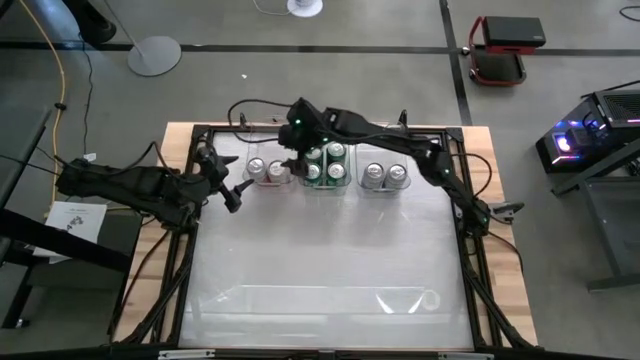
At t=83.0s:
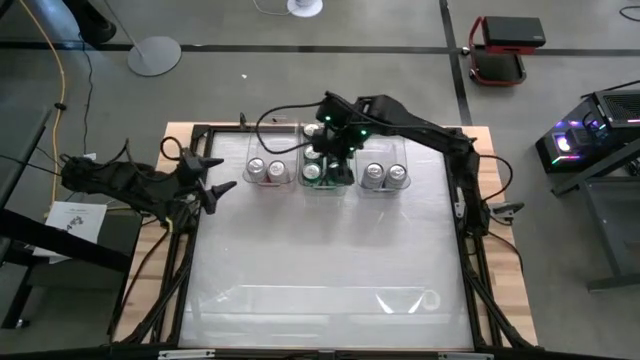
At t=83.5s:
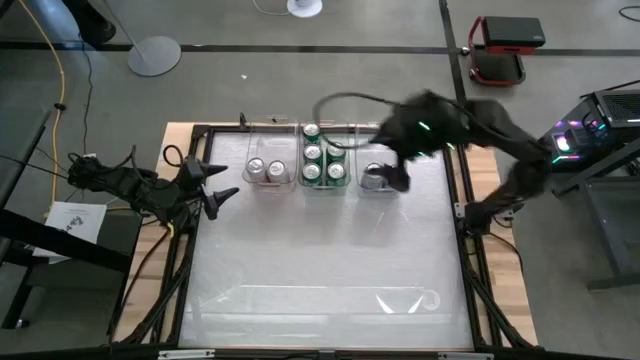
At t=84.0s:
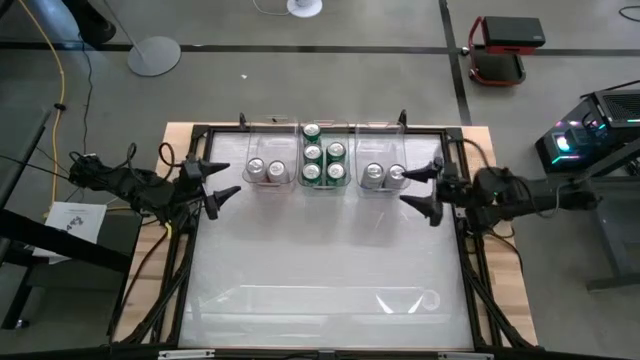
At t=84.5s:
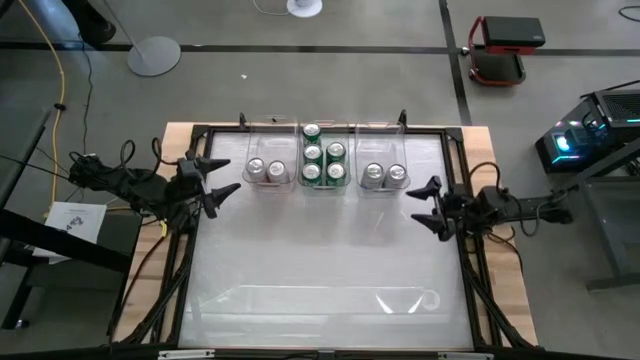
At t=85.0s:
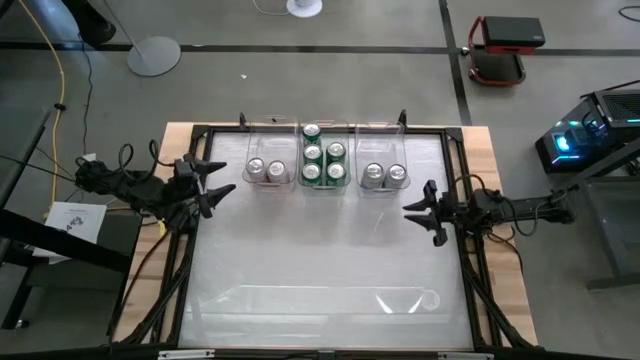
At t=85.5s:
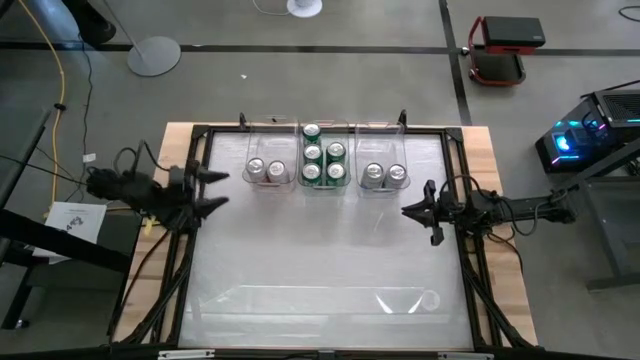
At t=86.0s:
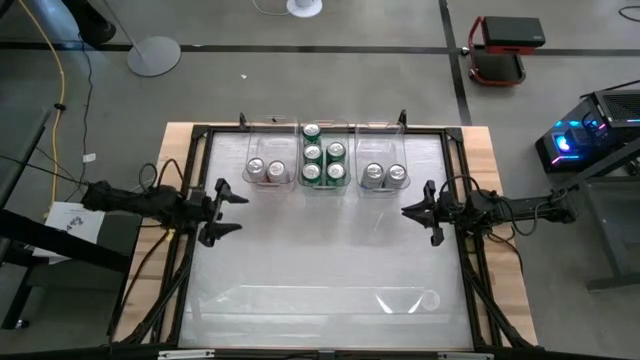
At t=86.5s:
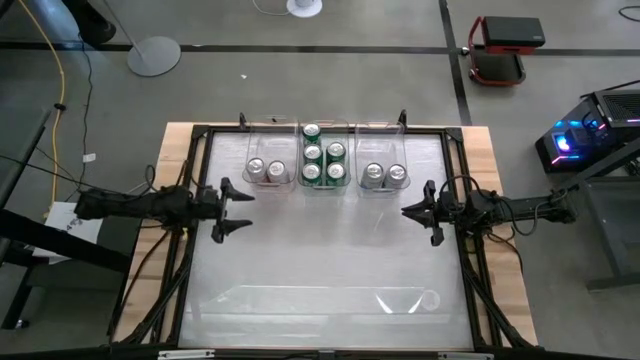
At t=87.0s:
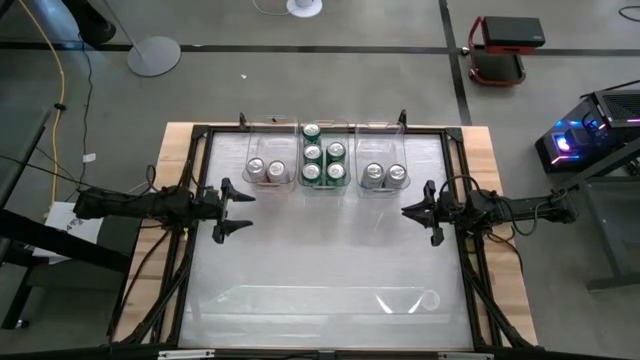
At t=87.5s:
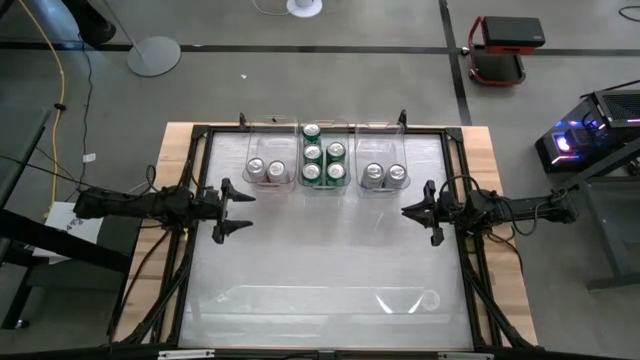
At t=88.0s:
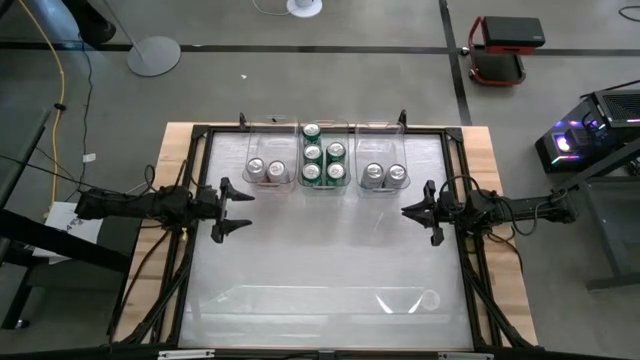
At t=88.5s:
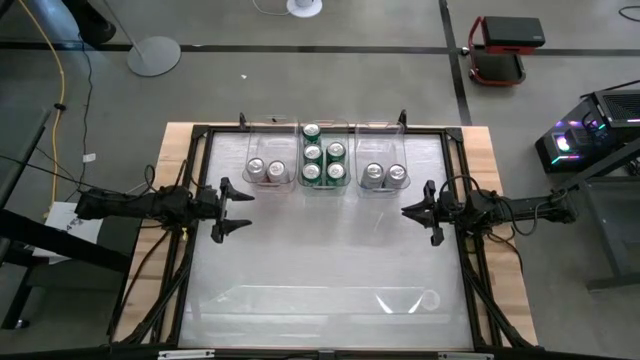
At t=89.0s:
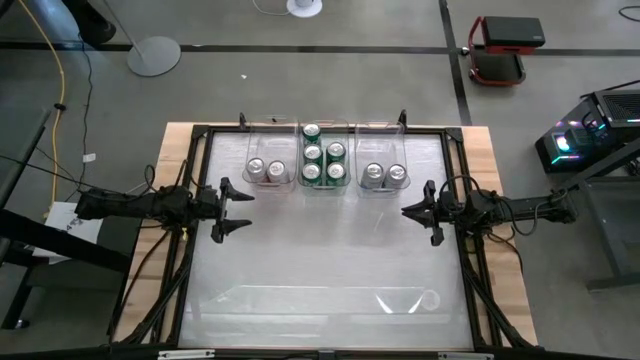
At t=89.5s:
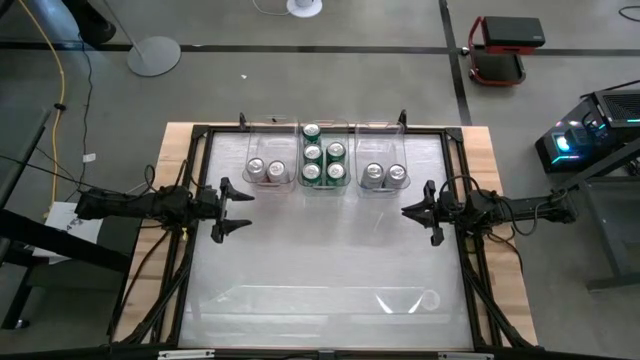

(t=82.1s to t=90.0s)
Task: Sort soda cans
Return to Home Position

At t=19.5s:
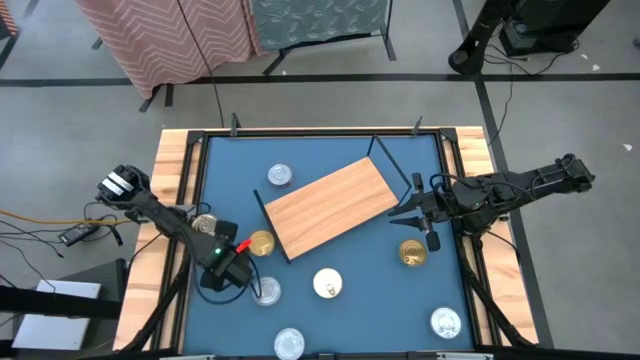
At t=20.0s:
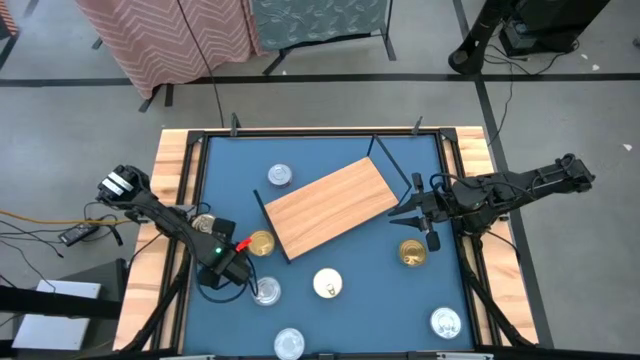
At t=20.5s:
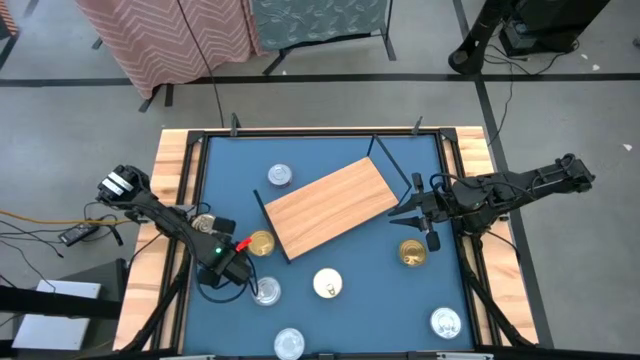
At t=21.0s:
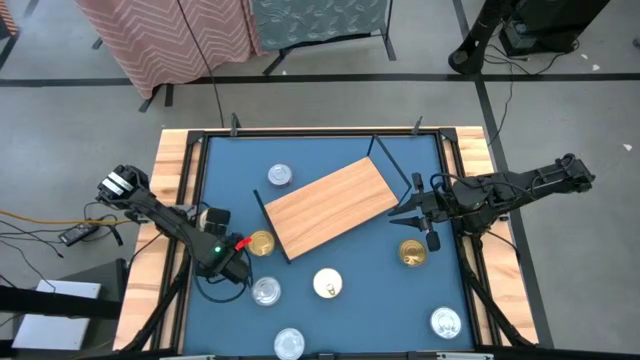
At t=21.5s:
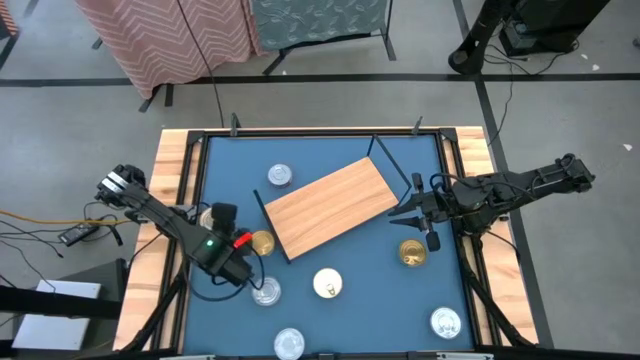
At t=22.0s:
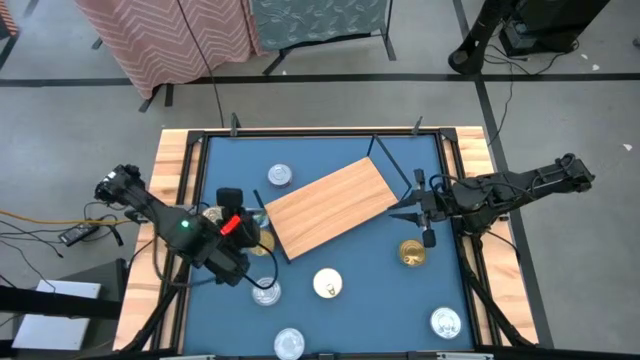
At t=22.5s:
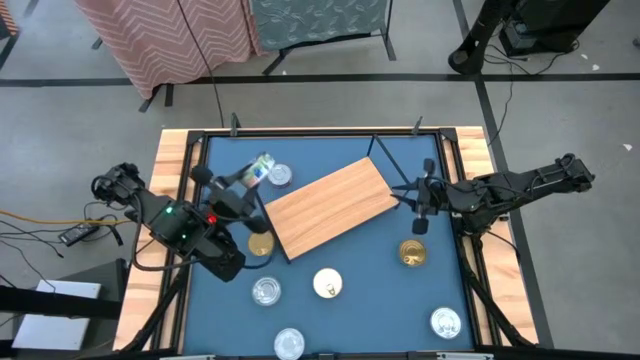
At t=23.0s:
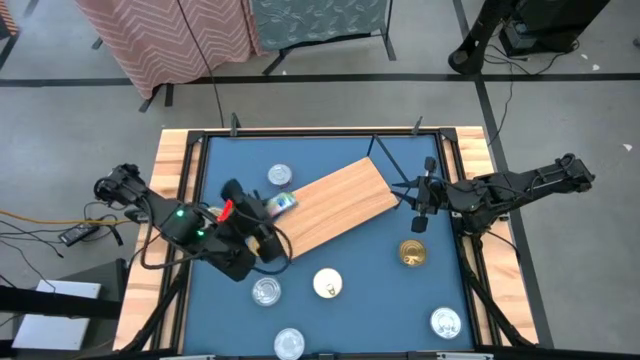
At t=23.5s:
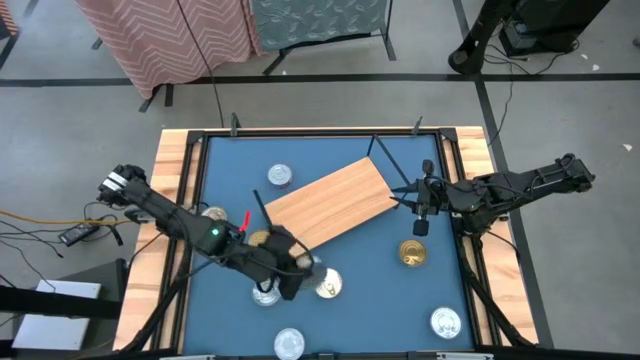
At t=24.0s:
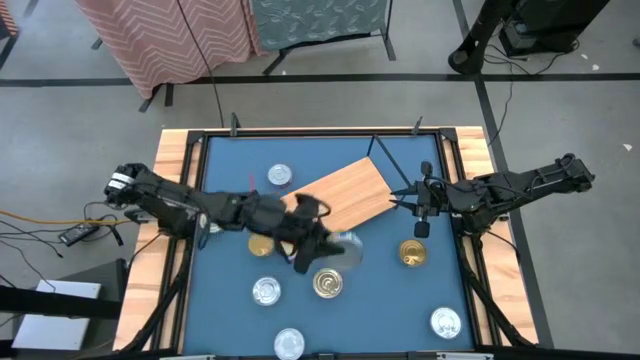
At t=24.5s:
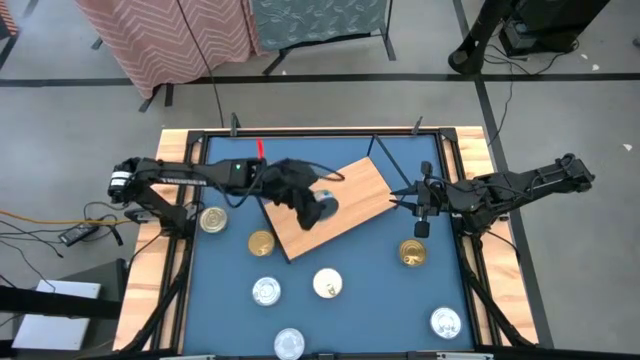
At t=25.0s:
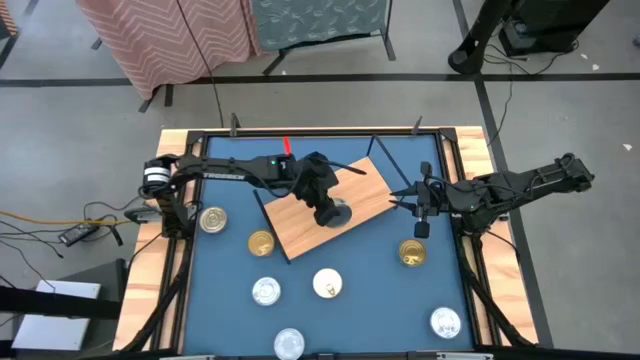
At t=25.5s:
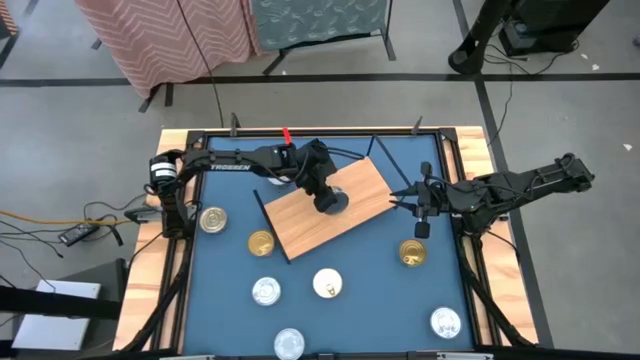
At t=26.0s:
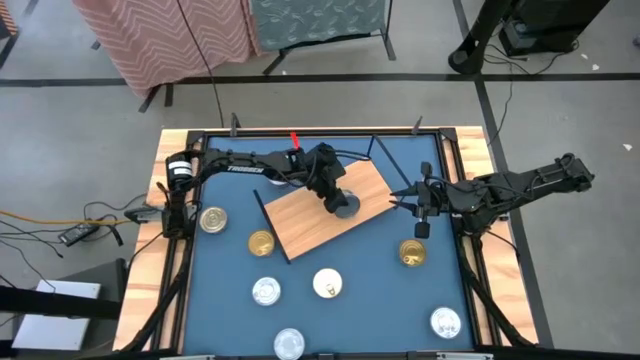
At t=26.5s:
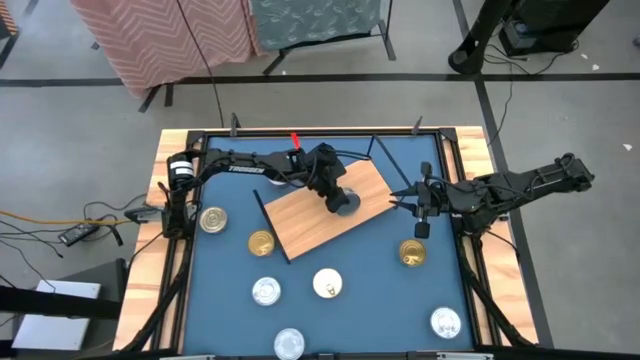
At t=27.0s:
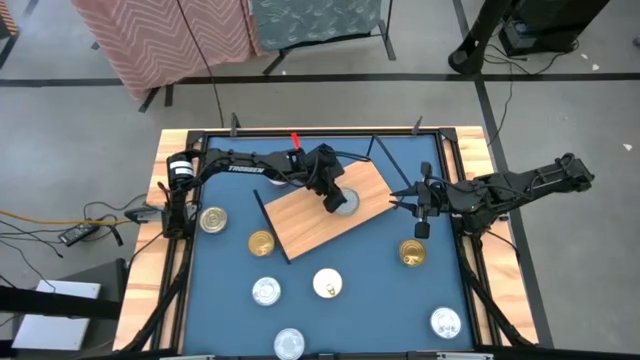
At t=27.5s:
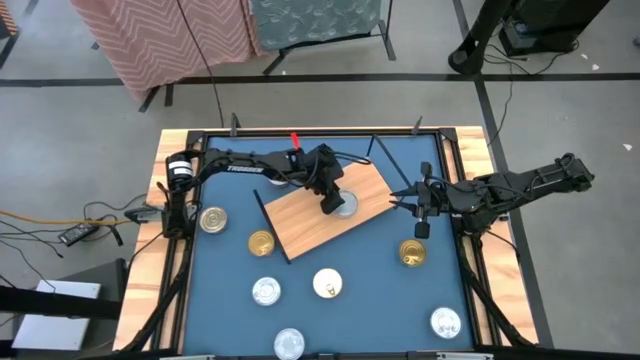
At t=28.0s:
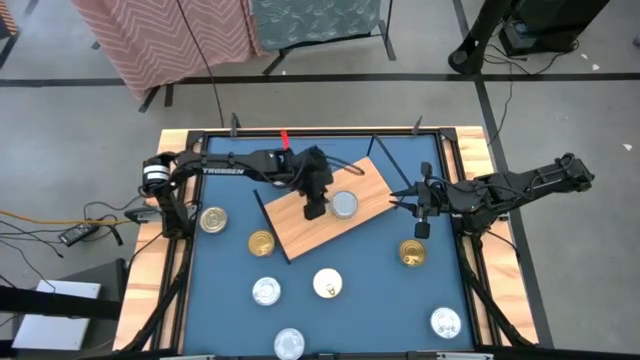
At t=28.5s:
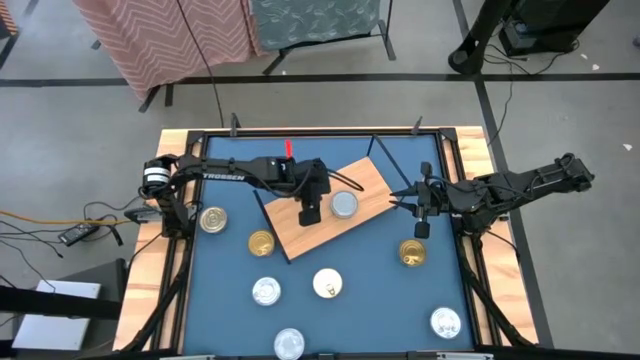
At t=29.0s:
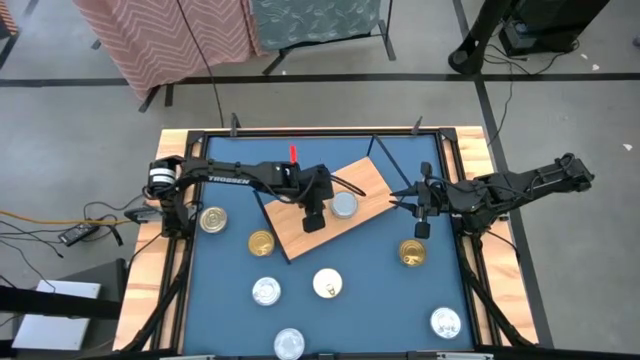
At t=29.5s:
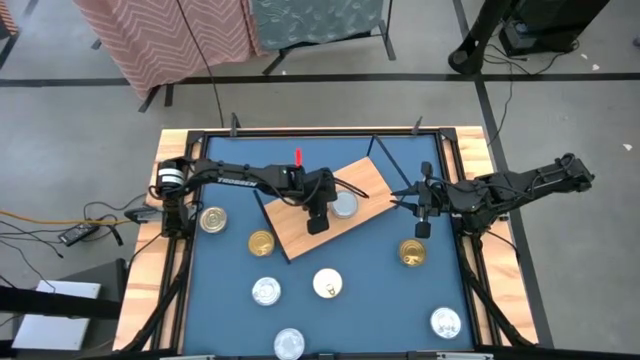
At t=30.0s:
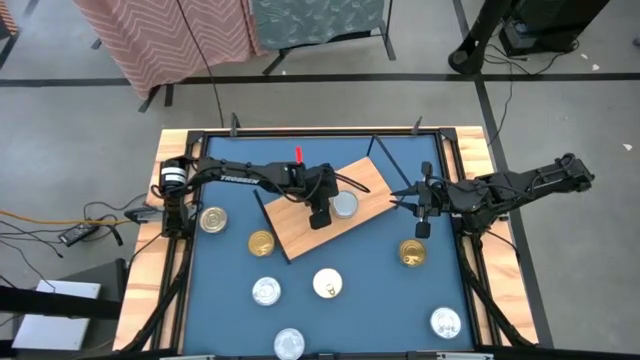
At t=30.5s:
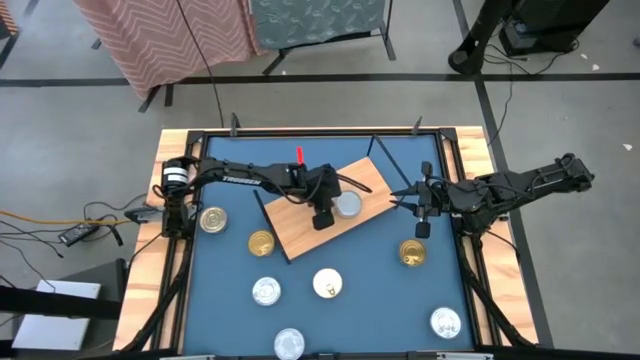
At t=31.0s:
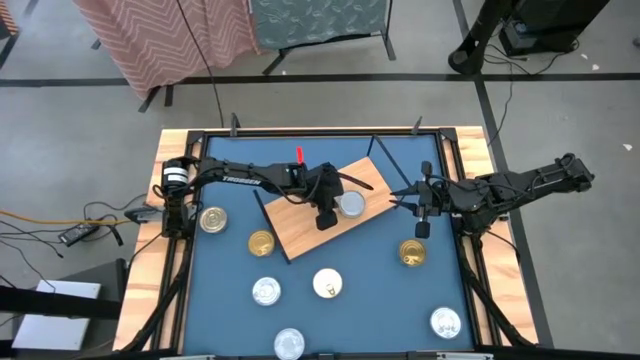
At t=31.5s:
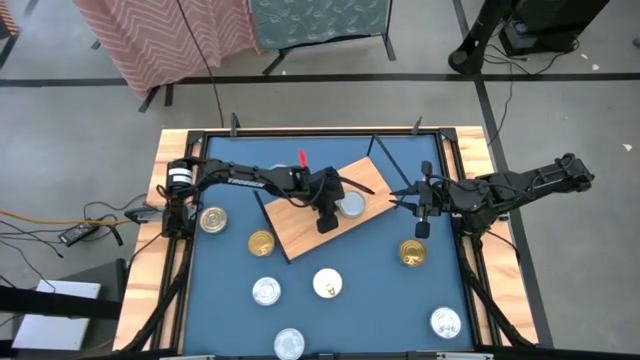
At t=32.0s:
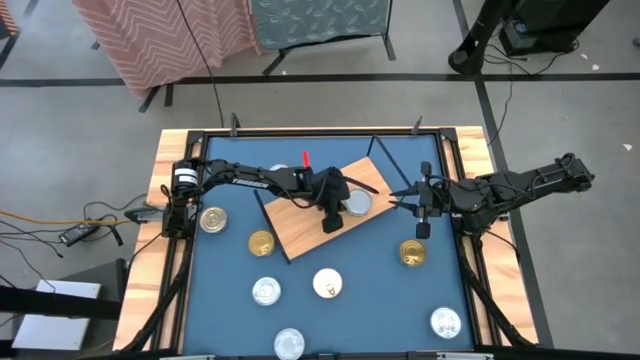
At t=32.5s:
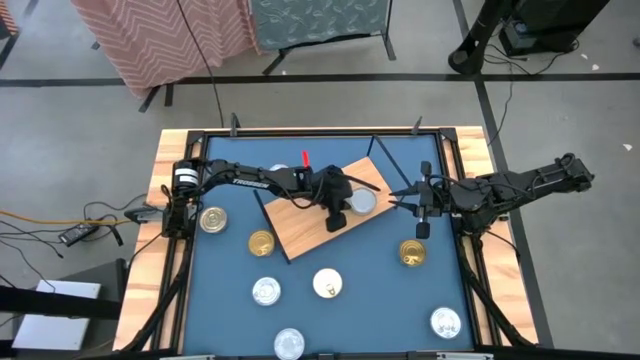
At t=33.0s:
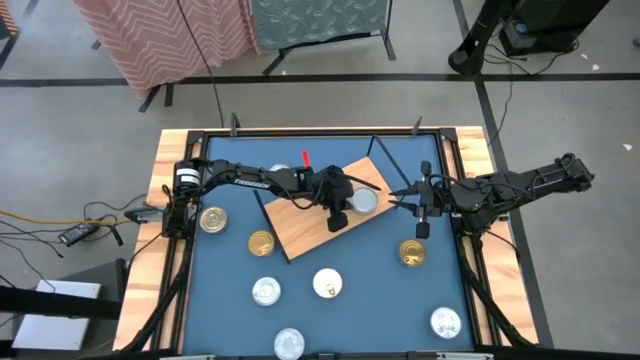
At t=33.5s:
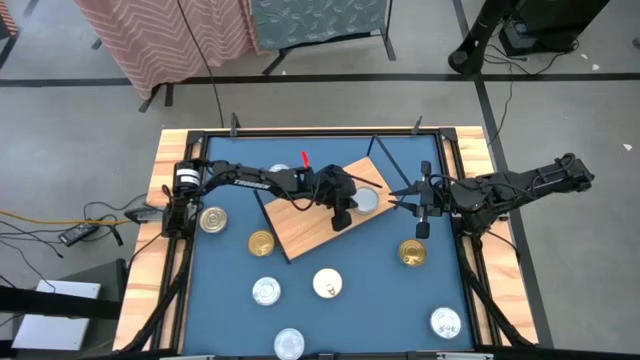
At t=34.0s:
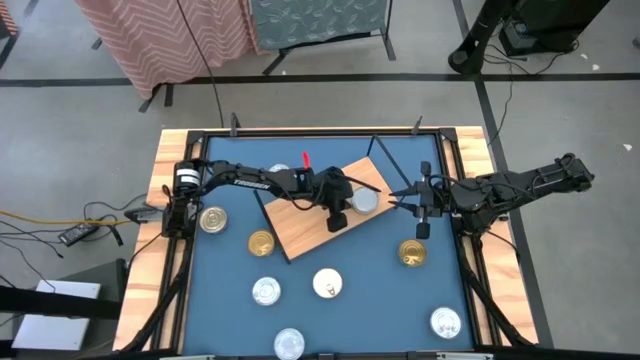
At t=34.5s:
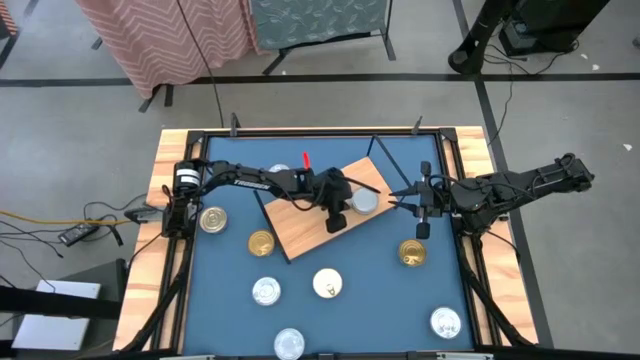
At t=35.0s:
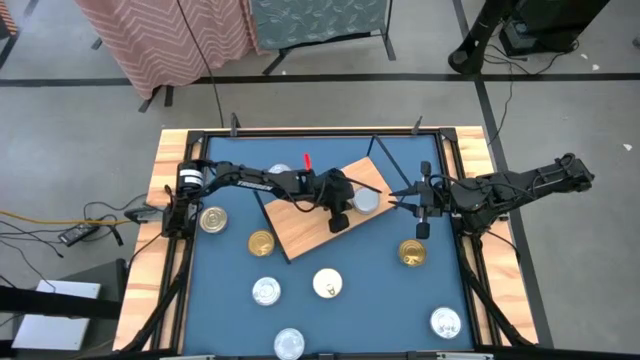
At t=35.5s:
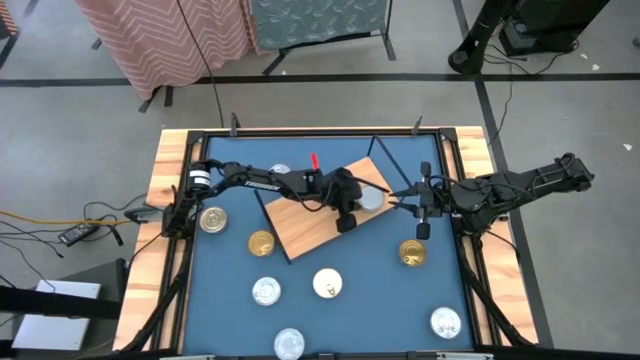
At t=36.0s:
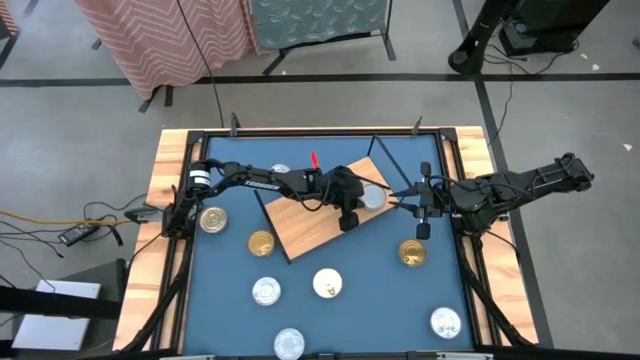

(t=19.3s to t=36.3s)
Task: Stack canned seafood by type on shelf
Put the green tuna can on the shelf
